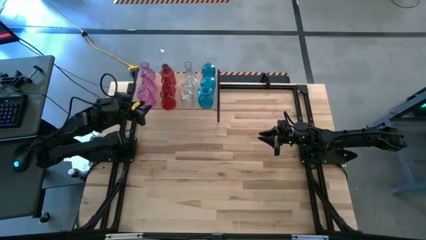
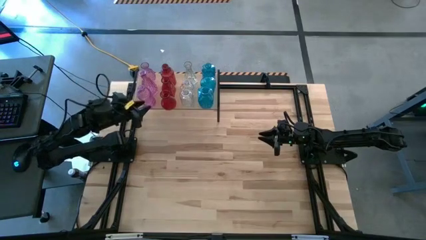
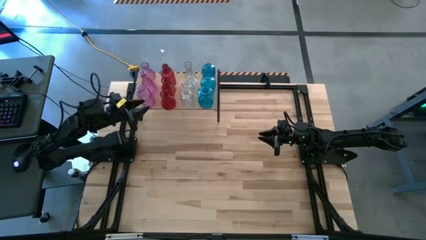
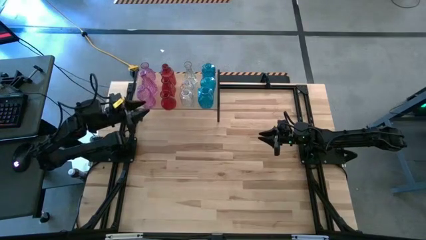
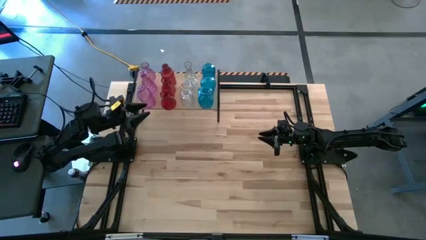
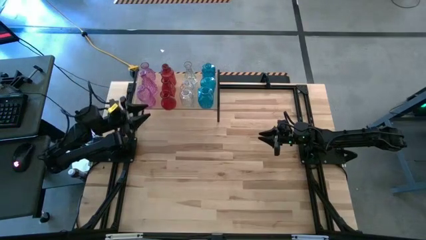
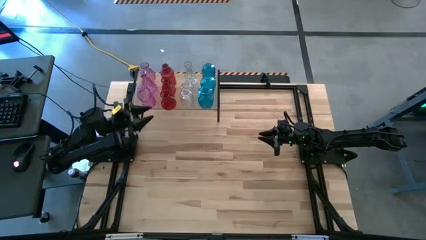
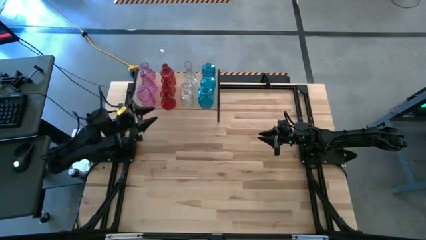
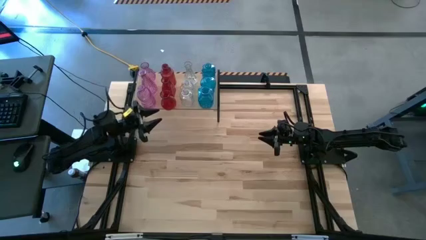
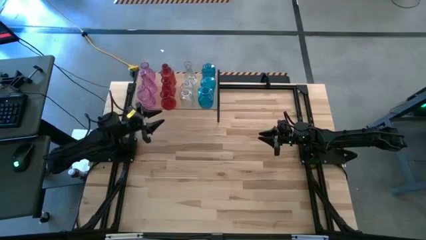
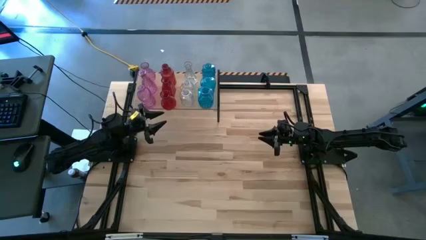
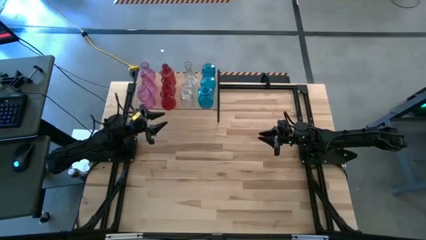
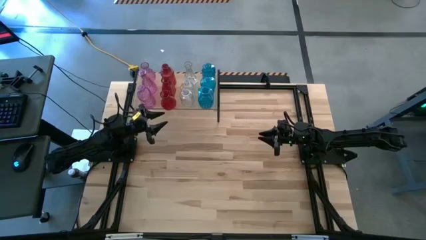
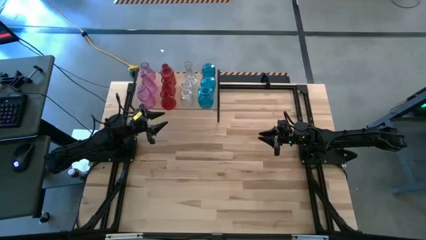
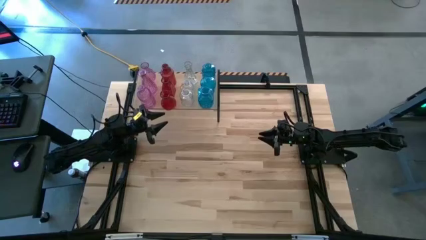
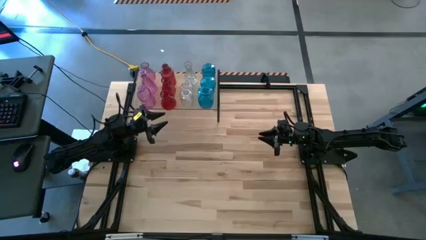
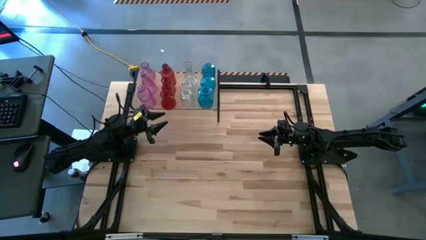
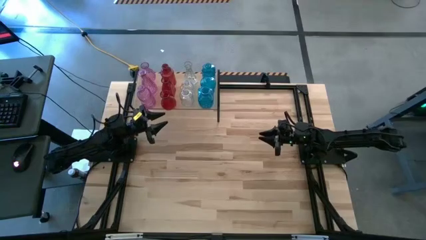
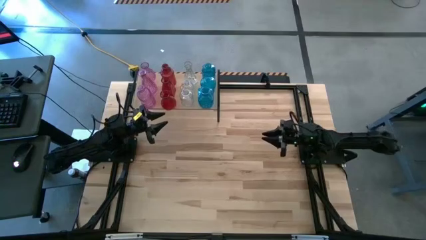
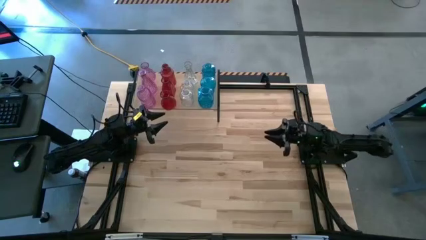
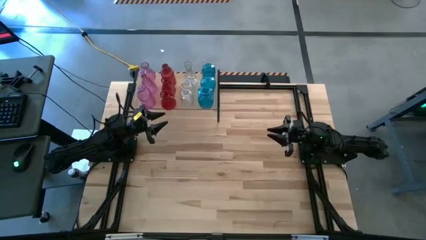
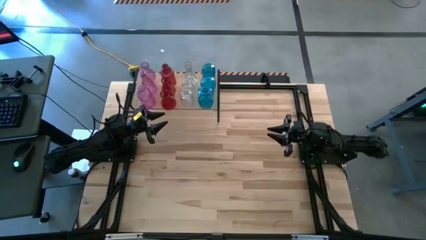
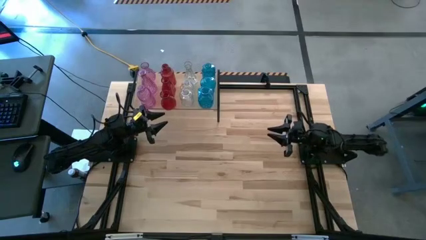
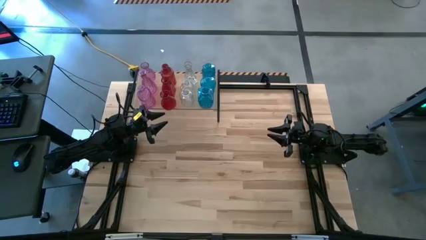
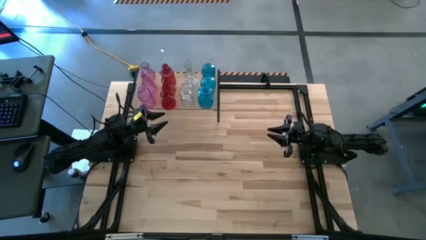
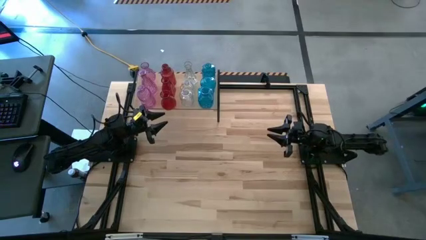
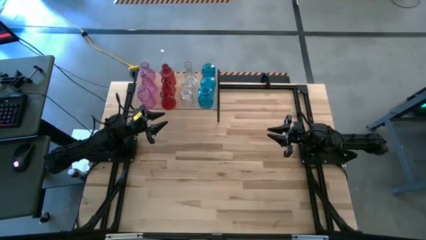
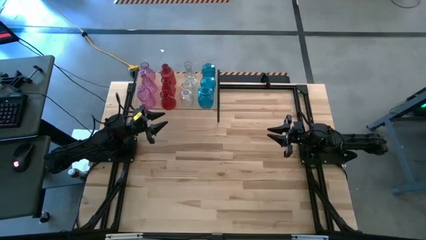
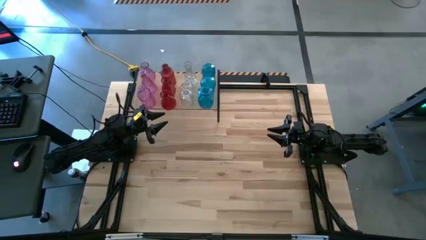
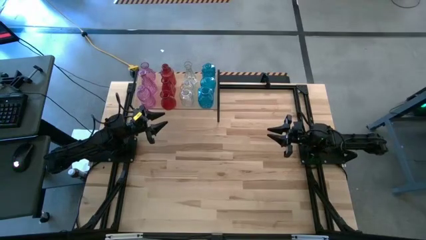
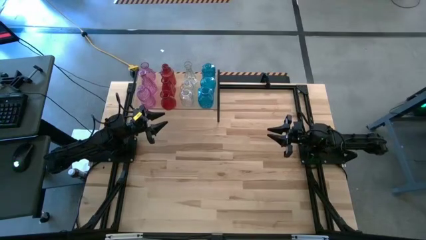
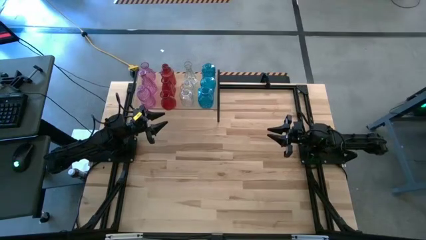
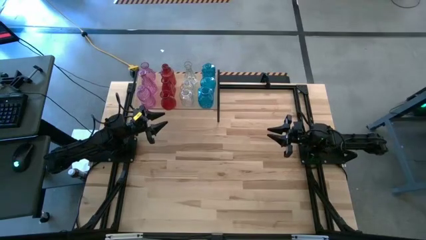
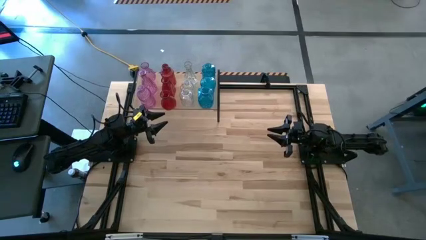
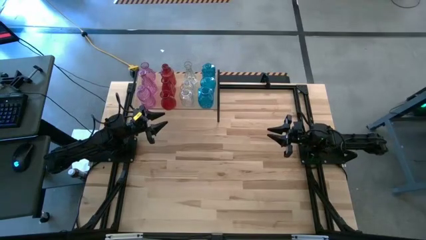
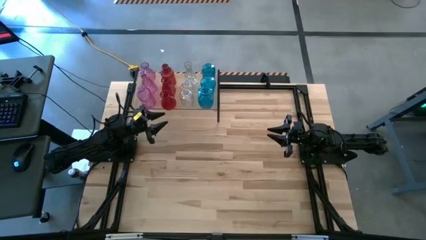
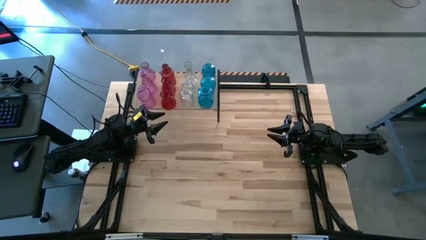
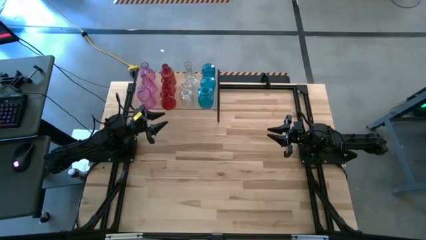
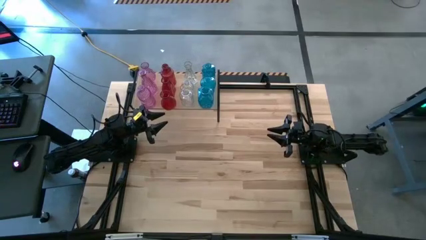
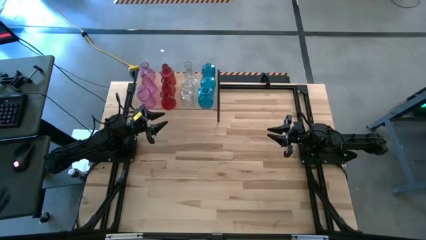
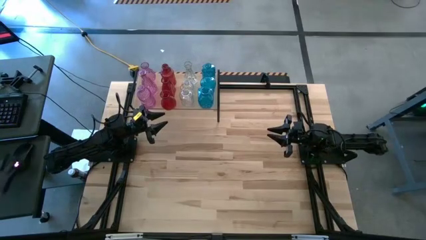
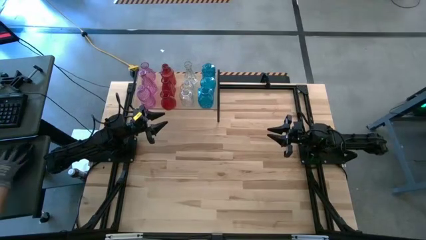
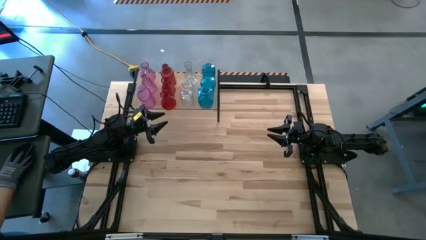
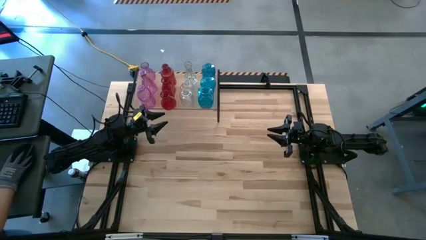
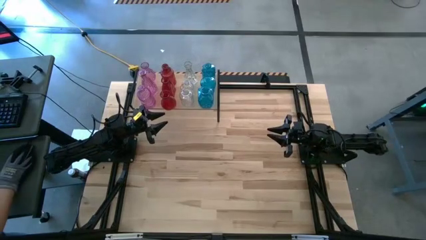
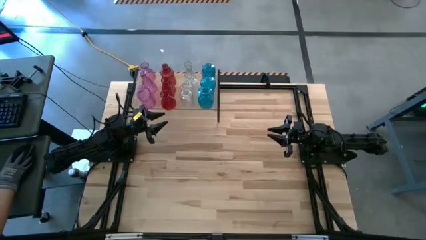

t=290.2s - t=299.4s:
Task: sort vases onto shelf
Return to Home Position

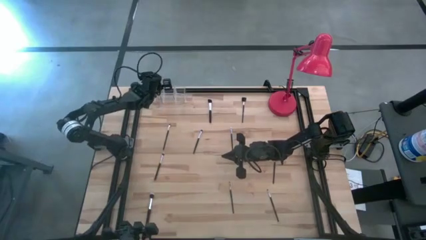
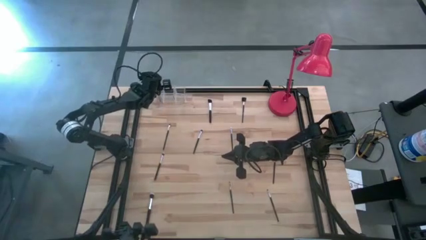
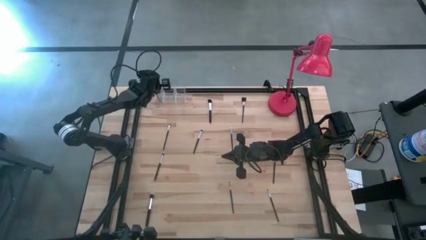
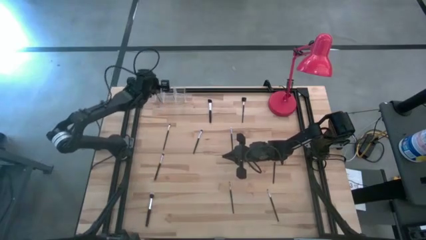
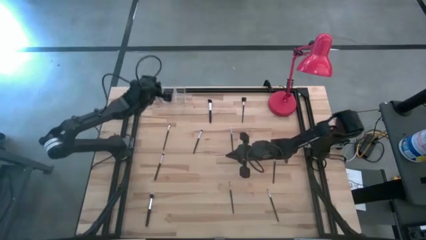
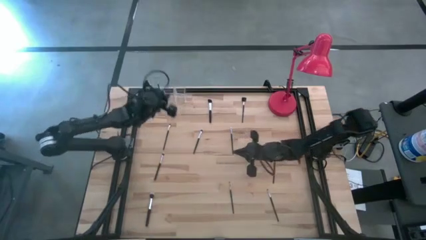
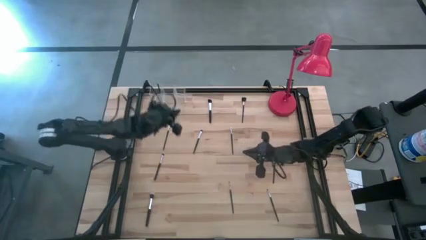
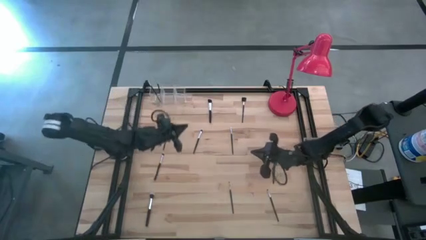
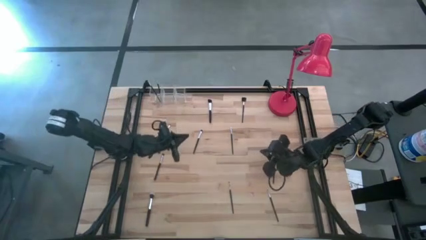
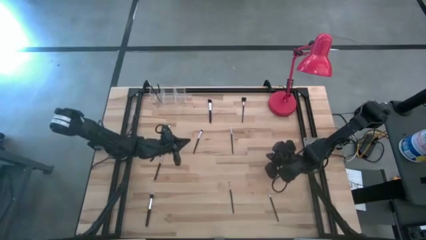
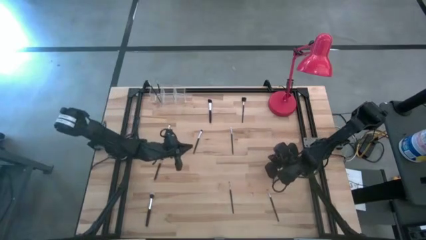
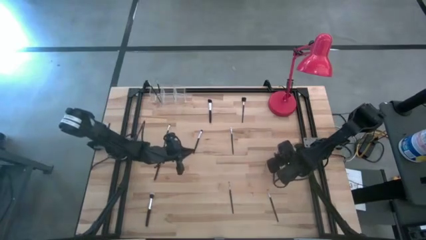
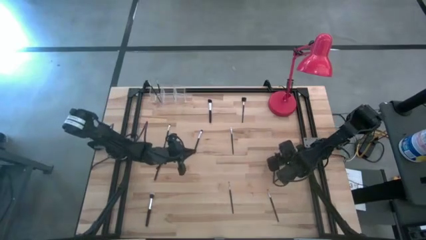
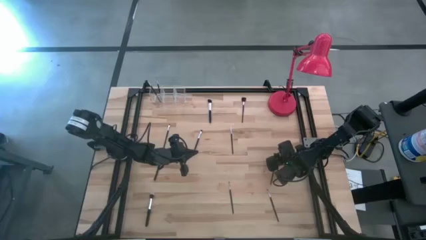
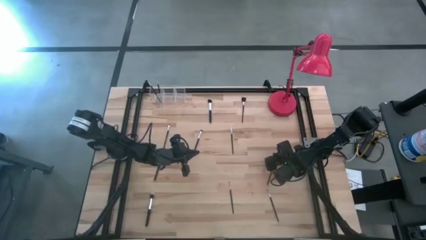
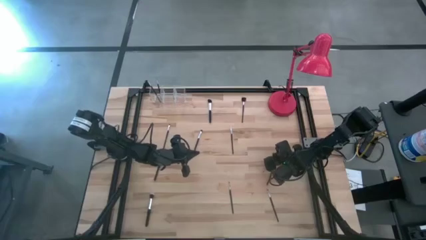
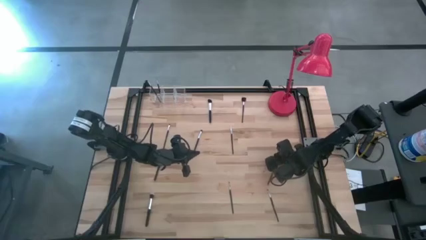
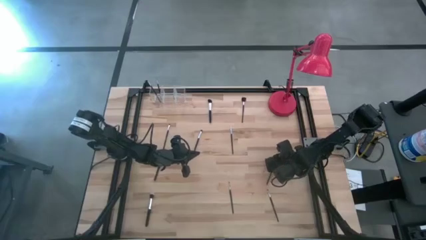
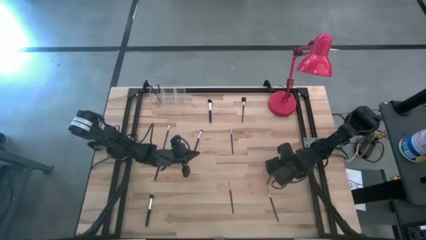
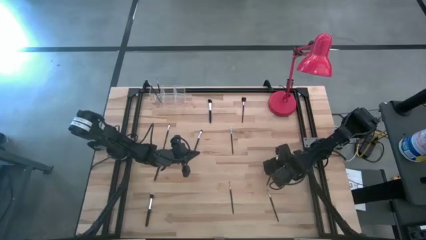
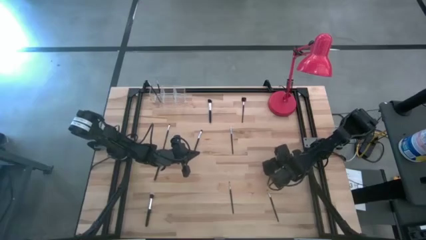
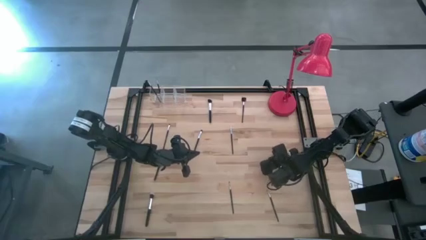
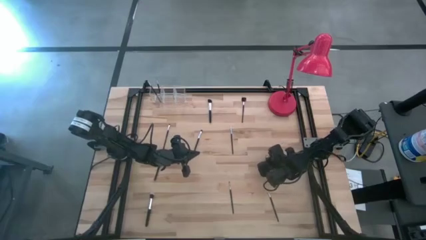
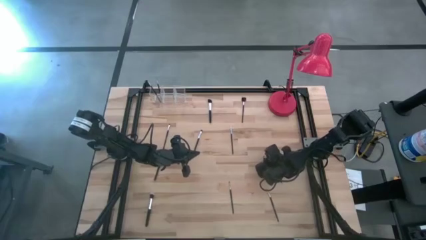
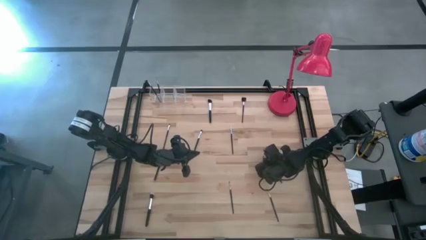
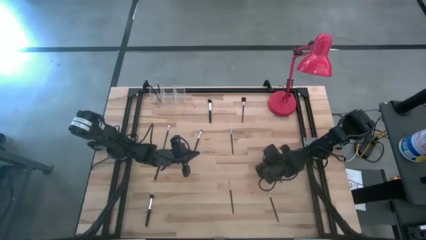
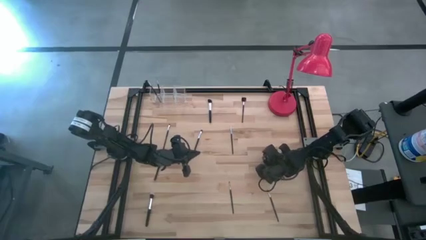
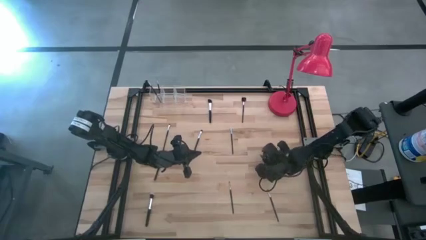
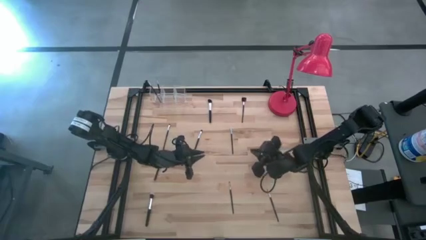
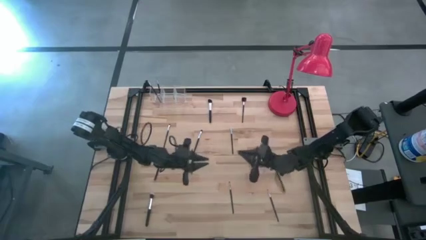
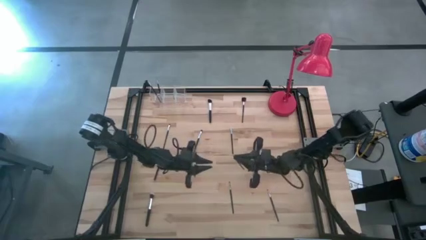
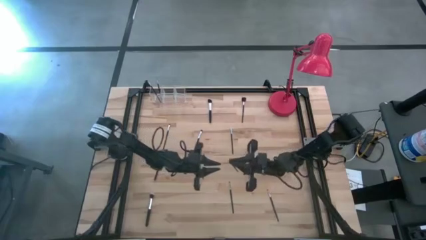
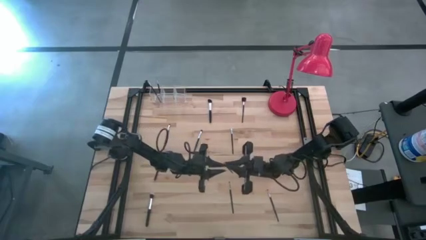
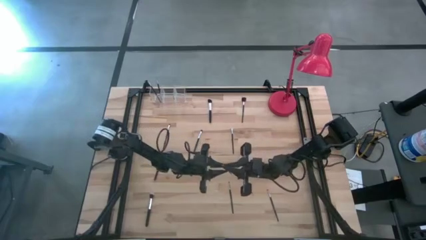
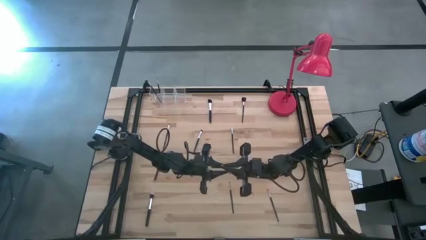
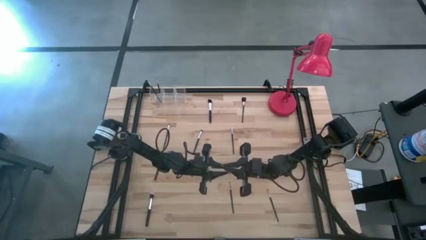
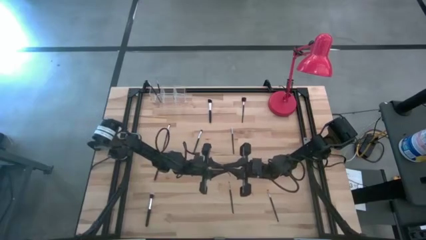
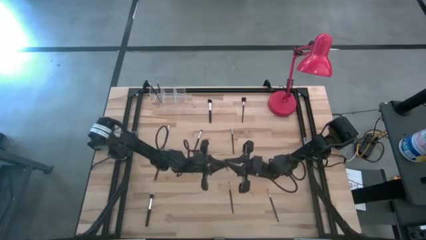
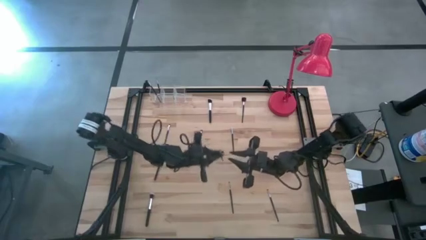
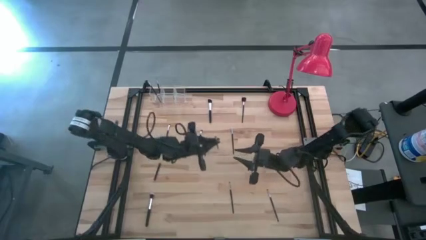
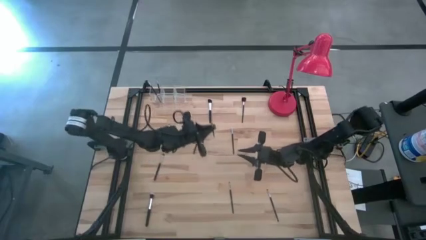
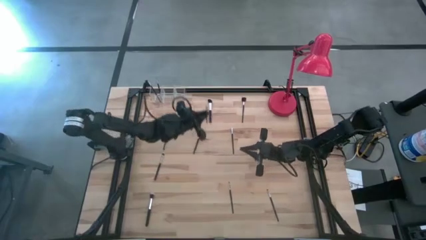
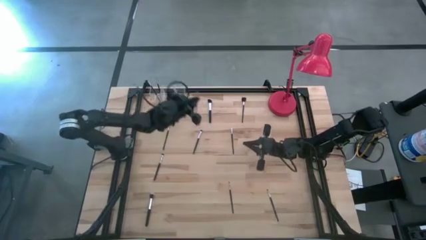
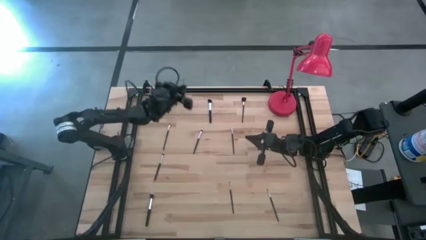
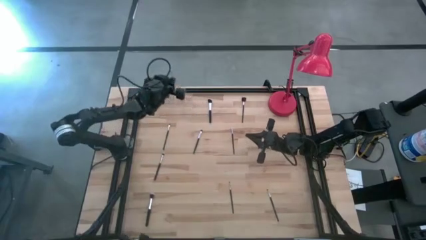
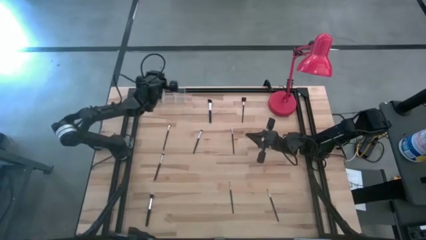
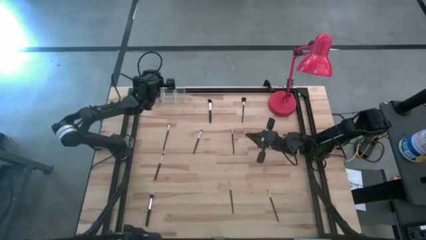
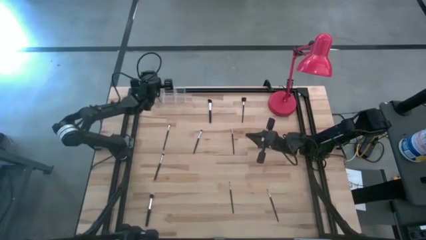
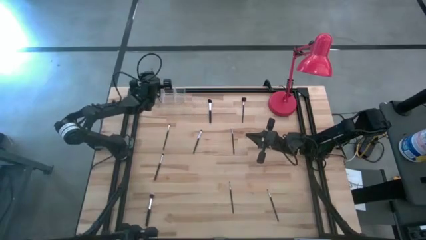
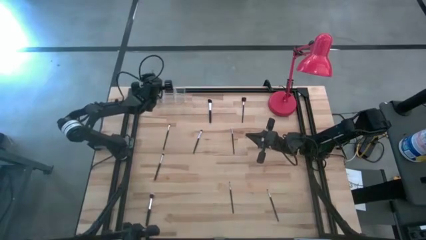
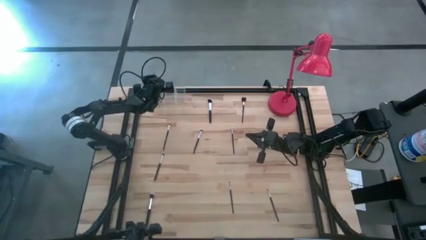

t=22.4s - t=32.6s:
Task: Pick & Place Makeup Brushes
Put the eyeshadow brush into the transparent organizer
